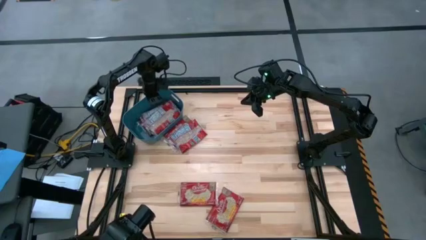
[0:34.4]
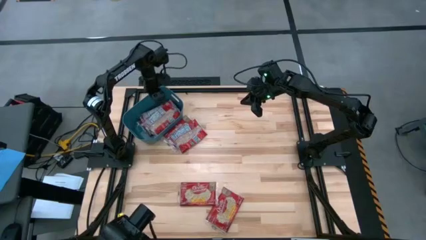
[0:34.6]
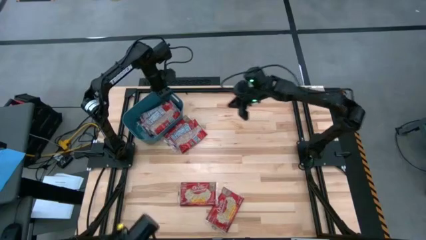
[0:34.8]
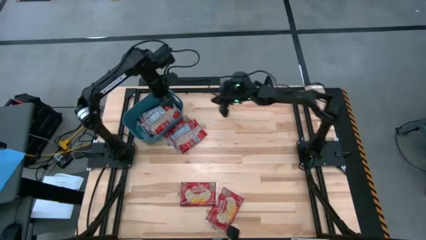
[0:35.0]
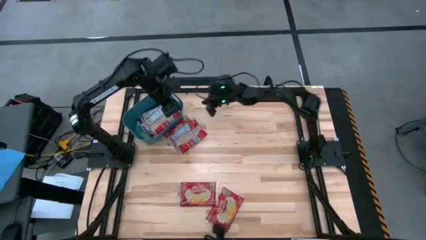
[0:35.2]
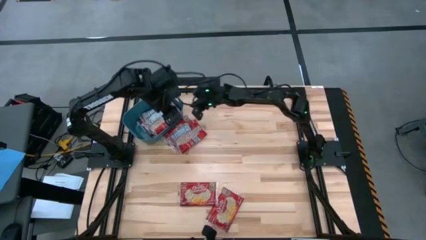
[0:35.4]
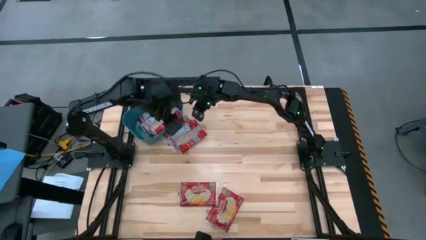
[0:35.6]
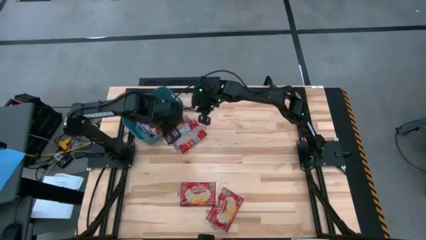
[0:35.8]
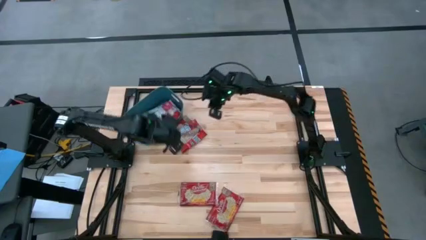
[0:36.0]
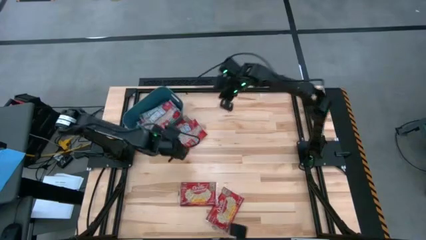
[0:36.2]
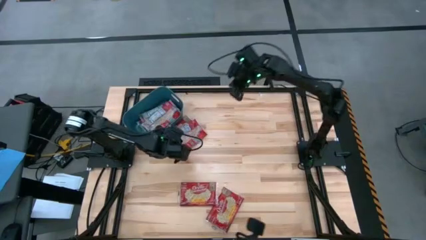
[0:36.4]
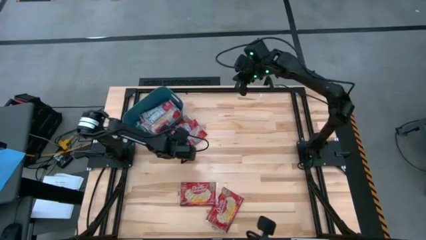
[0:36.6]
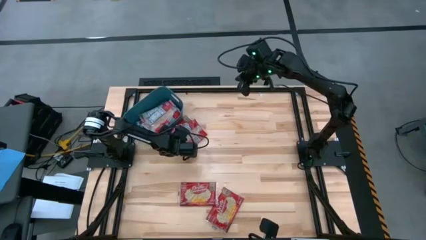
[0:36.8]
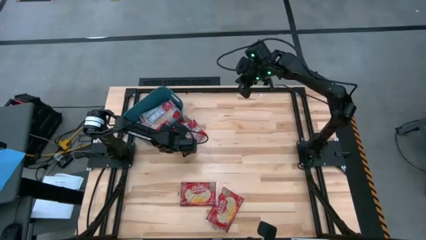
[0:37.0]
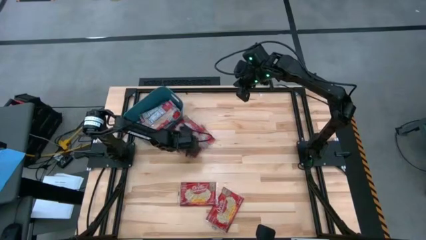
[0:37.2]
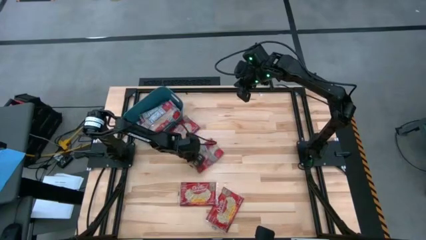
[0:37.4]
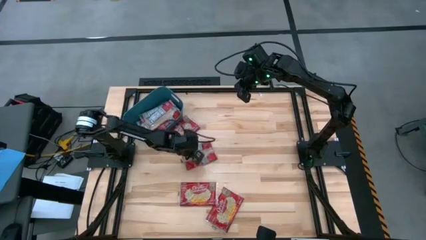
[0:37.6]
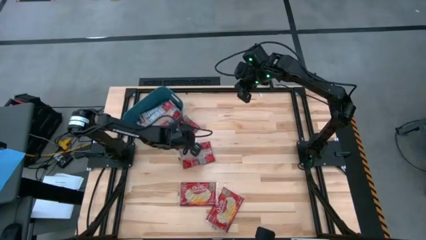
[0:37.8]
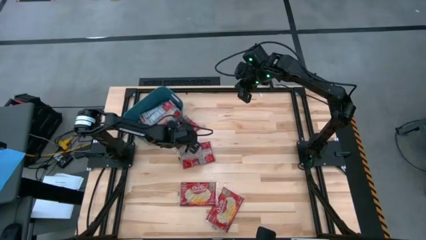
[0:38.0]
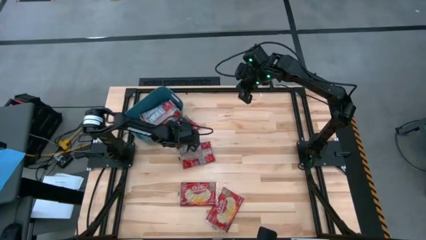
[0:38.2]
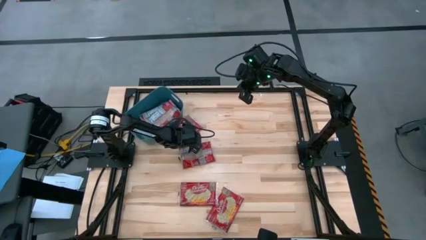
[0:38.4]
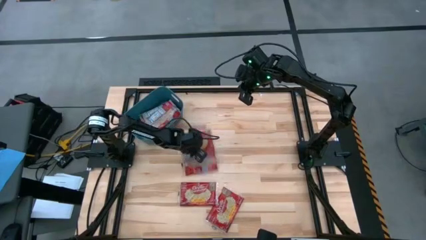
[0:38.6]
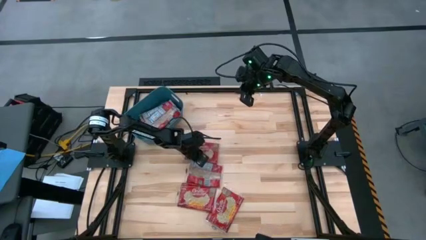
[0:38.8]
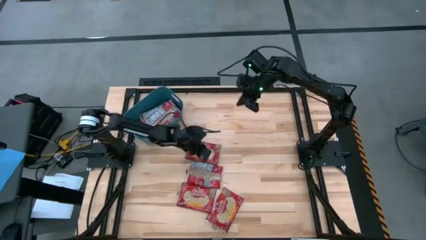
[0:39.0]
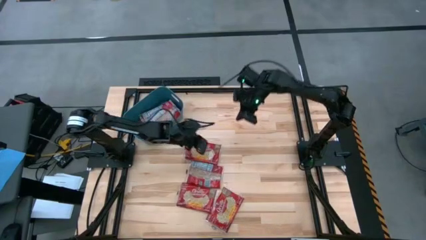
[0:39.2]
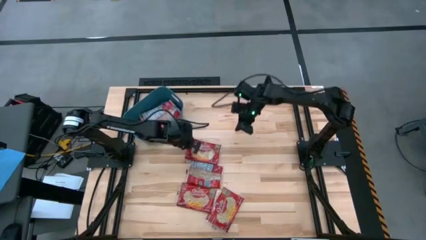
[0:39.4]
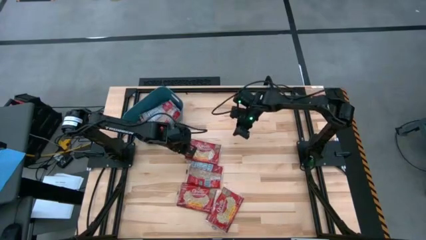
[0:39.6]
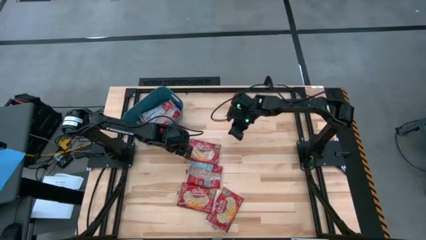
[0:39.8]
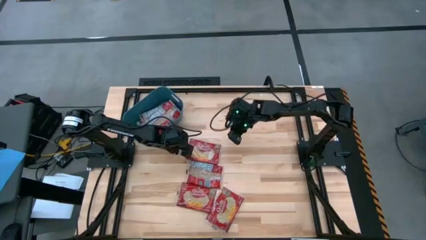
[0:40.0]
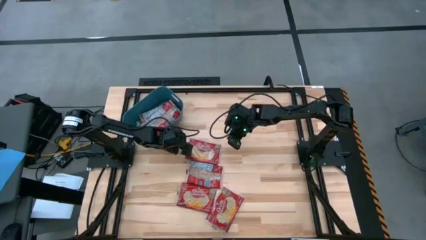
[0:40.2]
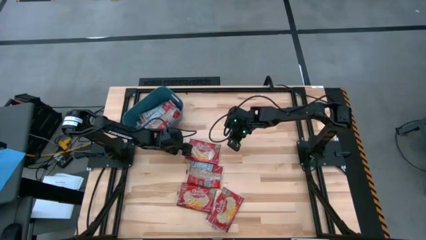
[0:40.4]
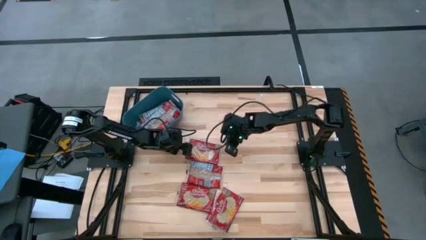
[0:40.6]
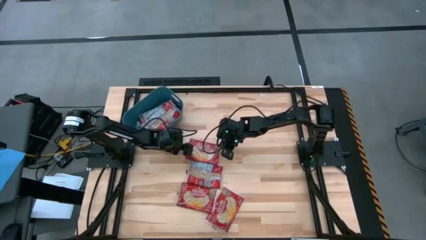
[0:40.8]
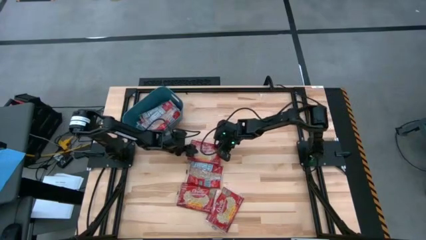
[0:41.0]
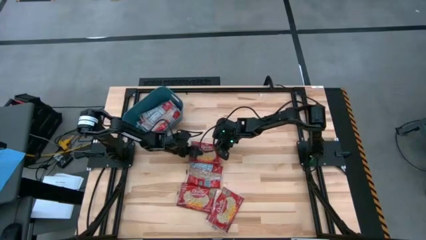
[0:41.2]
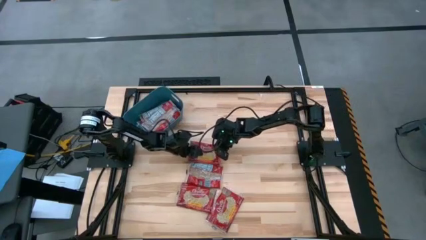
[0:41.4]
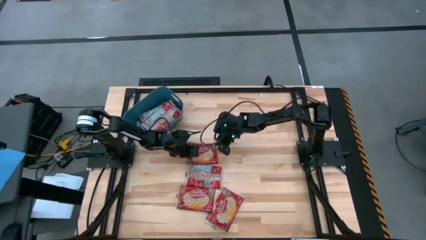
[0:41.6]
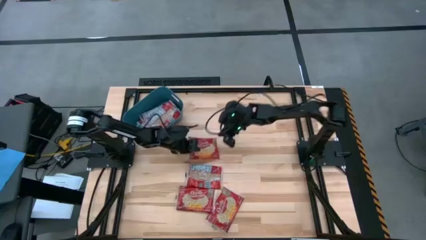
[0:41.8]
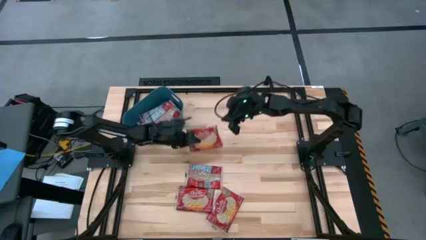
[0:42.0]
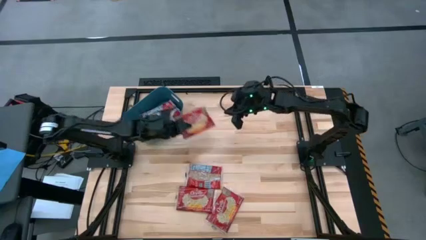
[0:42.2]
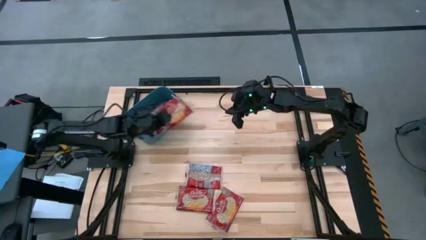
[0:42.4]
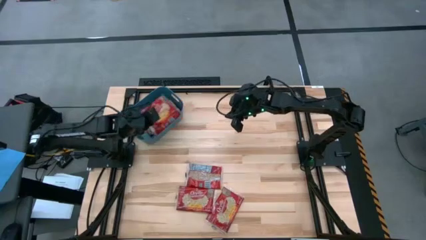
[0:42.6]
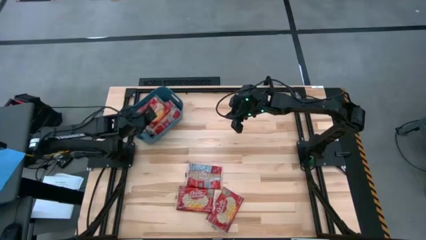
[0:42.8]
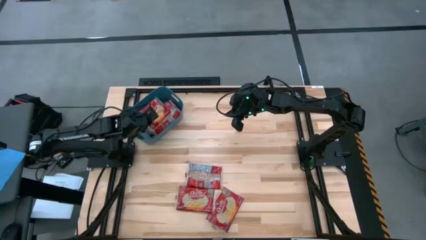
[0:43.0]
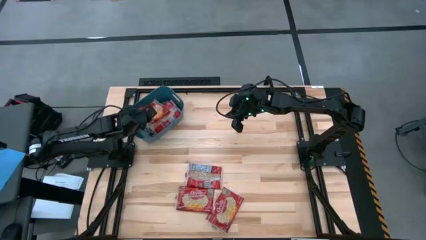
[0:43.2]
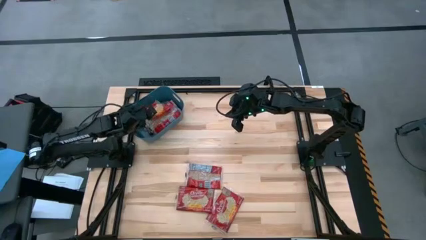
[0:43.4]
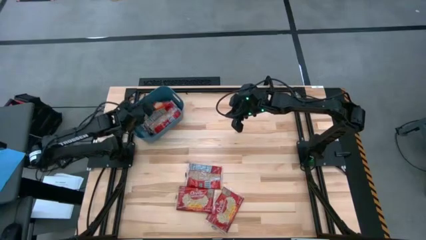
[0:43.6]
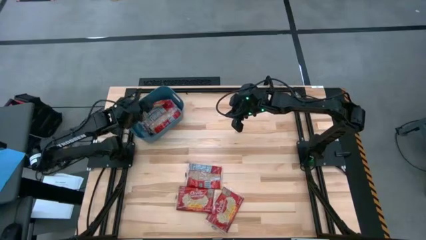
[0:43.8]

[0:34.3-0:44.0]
Task: Sort popcorn bags into baskets
Put the popcorn bag into the green bin

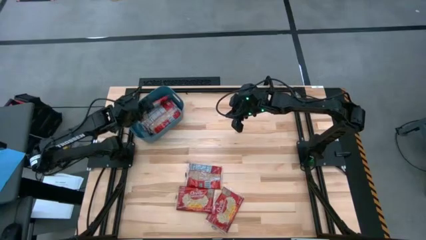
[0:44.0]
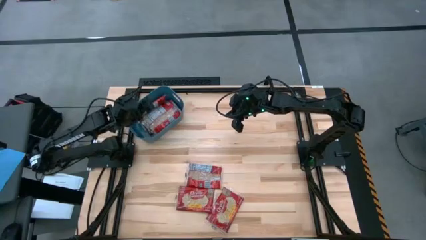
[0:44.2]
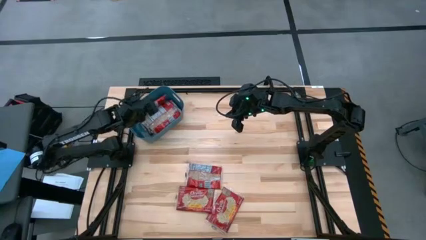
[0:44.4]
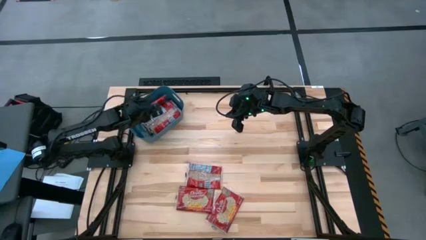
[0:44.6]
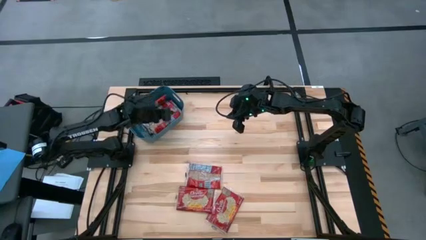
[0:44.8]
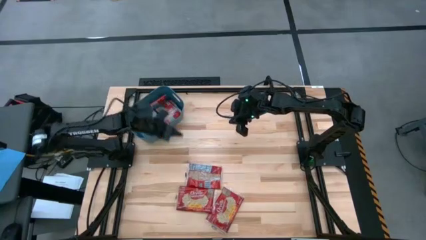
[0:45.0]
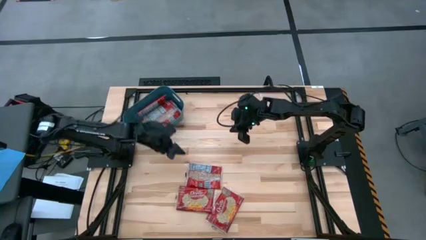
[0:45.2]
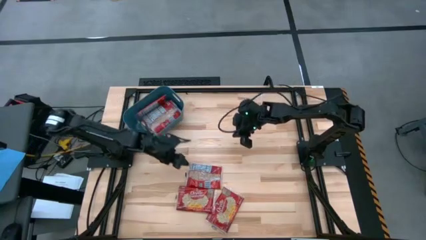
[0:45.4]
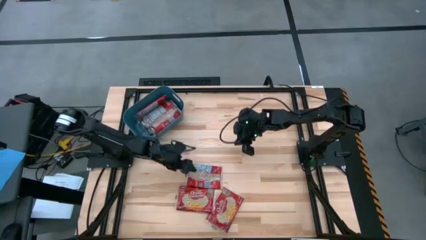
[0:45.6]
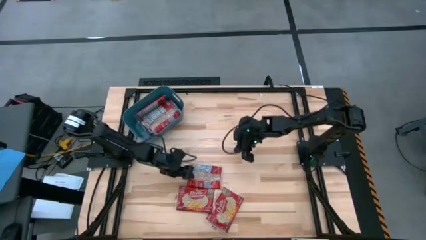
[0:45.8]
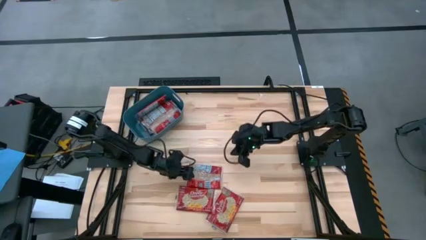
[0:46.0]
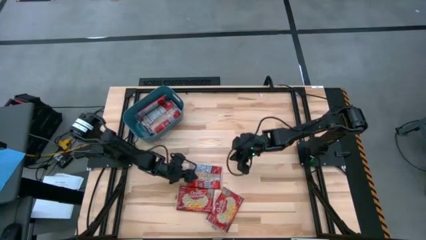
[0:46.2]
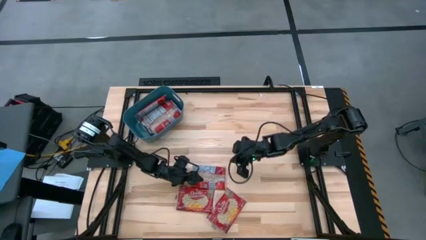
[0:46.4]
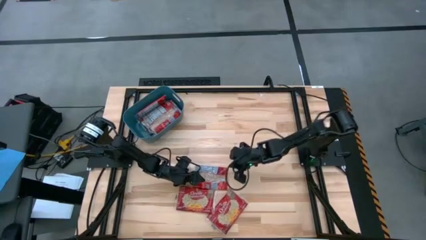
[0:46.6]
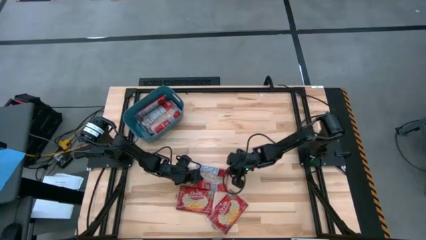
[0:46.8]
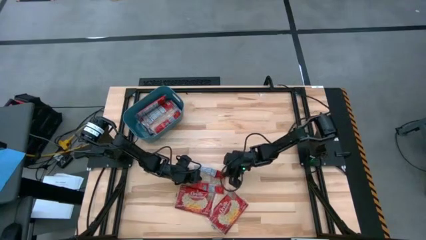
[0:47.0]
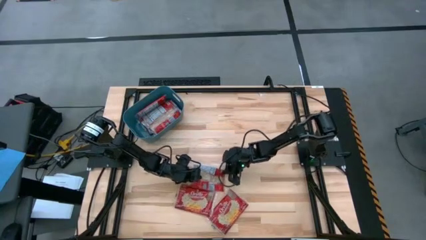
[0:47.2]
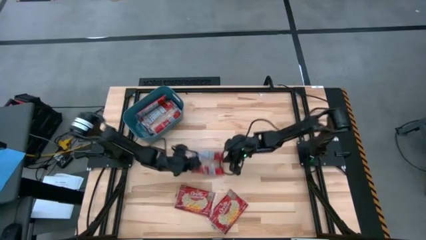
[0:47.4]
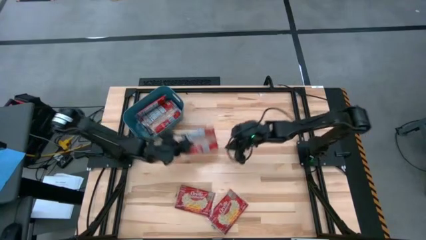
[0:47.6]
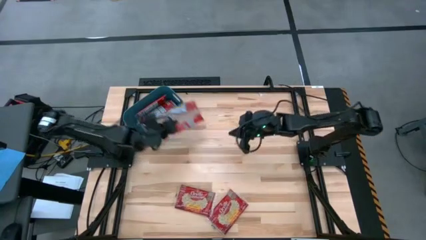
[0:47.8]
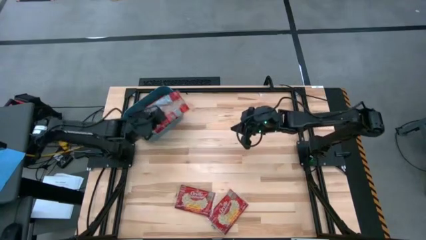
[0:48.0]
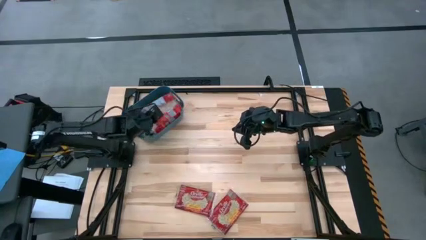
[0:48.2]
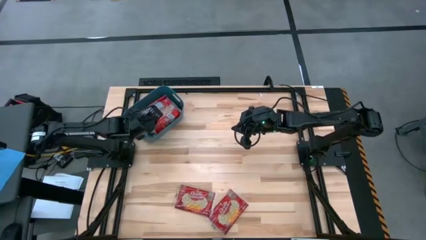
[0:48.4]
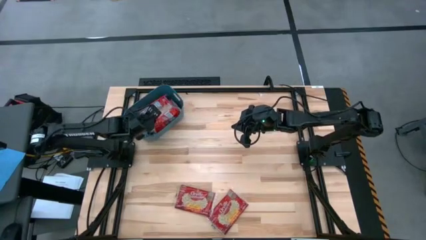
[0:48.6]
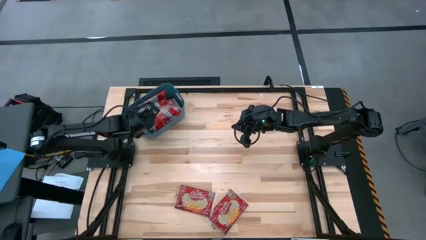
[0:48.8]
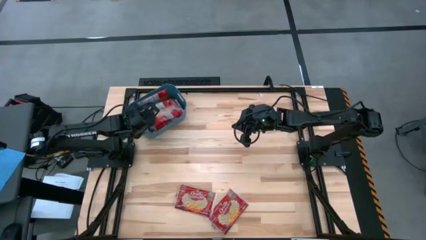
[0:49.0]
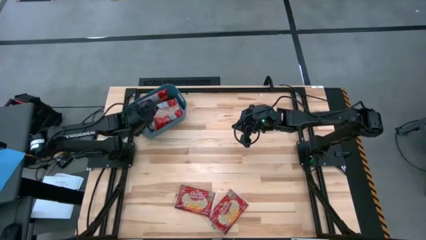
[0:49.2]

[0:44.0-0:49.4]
Put the popcorn bag into the green bin
